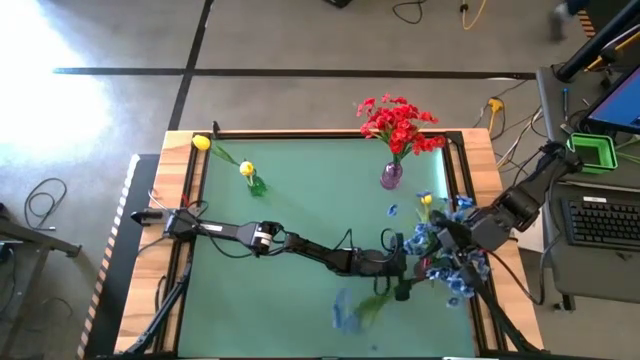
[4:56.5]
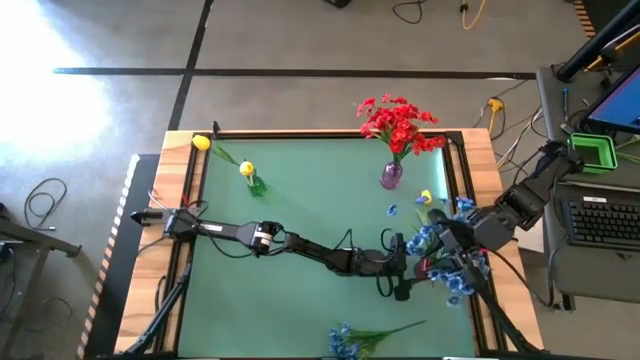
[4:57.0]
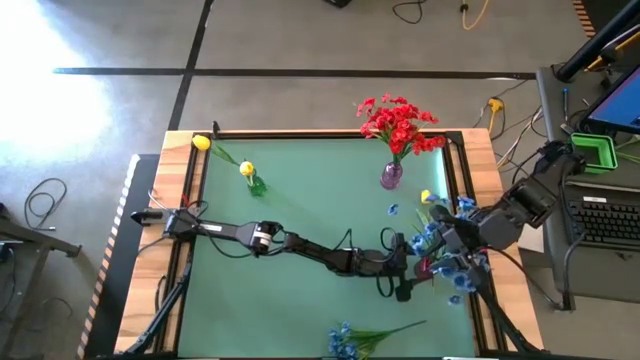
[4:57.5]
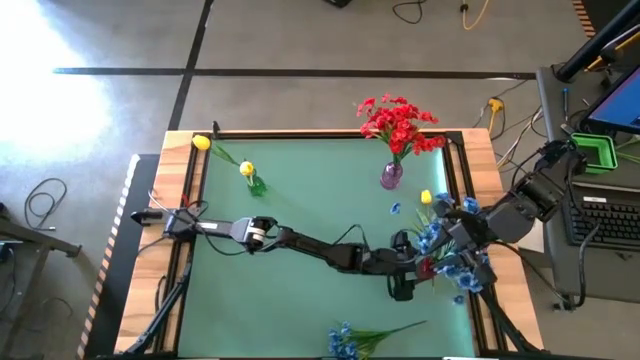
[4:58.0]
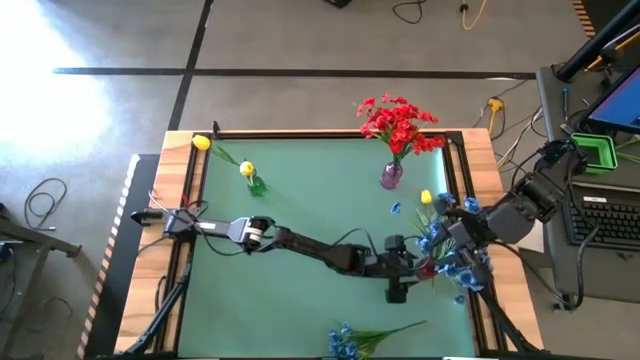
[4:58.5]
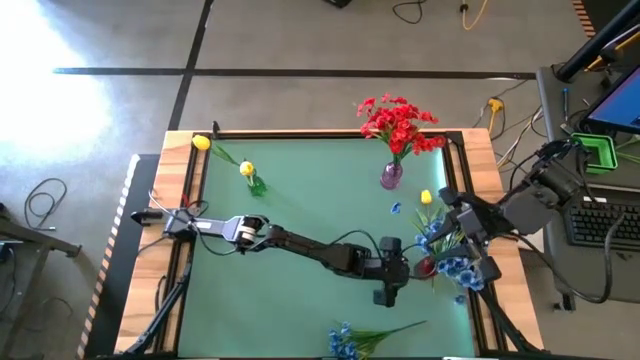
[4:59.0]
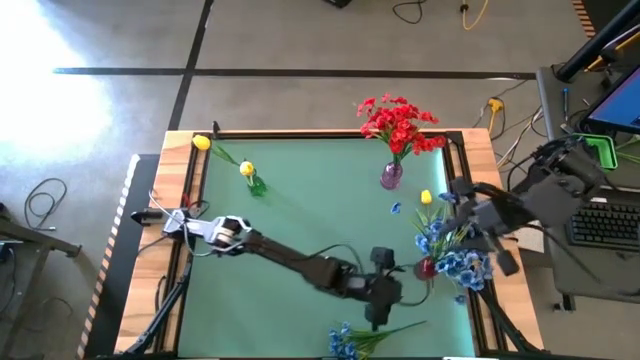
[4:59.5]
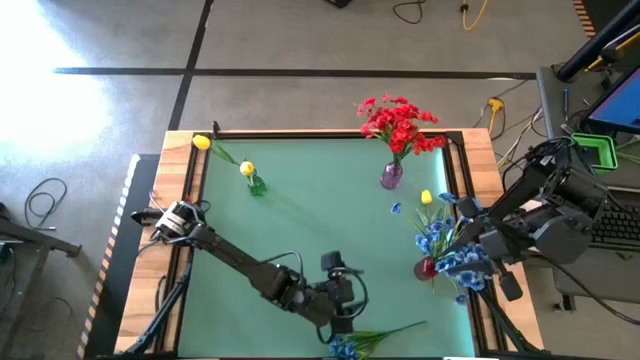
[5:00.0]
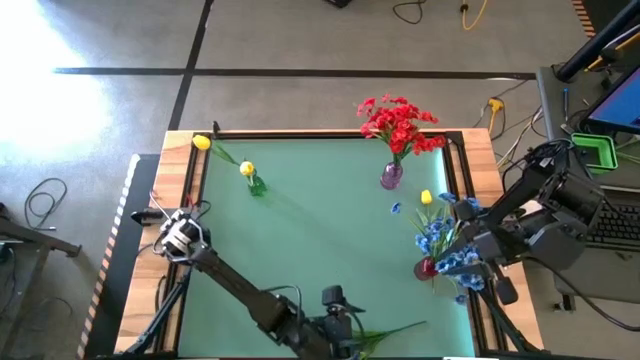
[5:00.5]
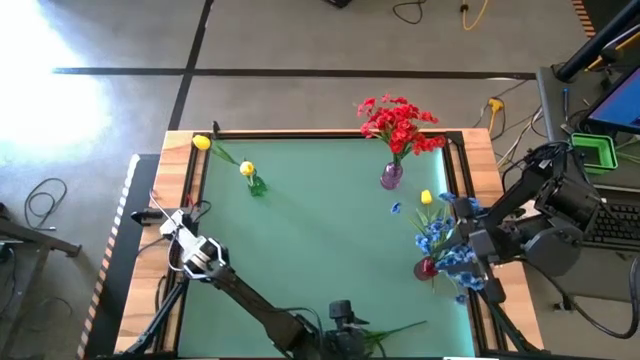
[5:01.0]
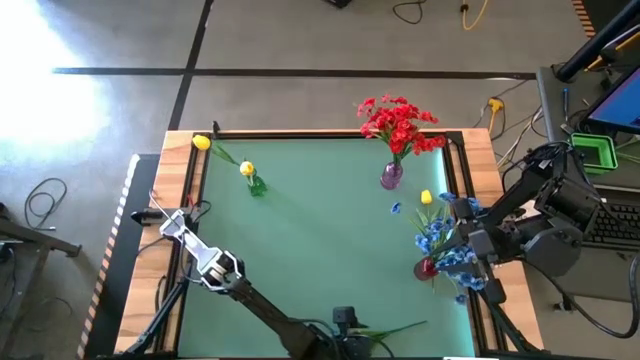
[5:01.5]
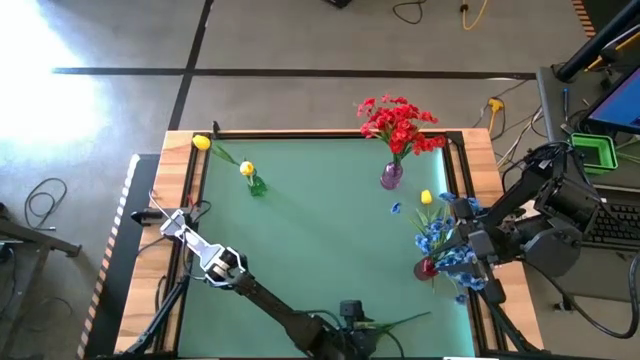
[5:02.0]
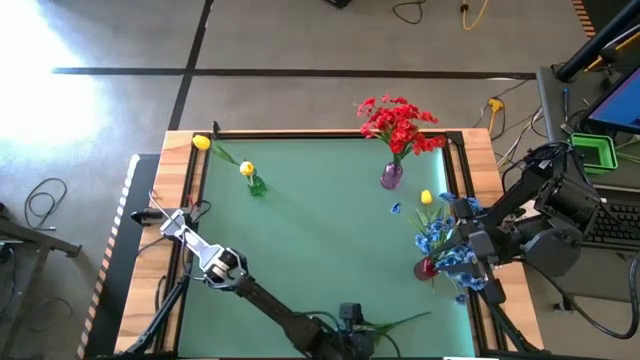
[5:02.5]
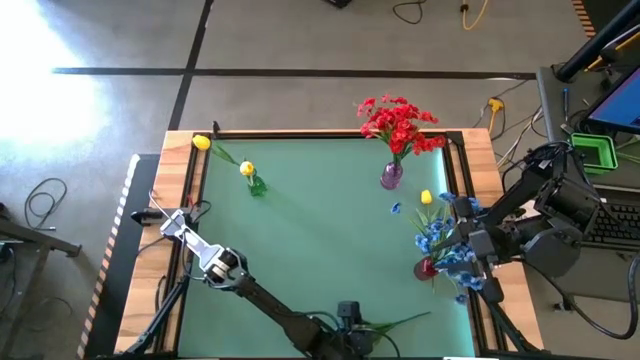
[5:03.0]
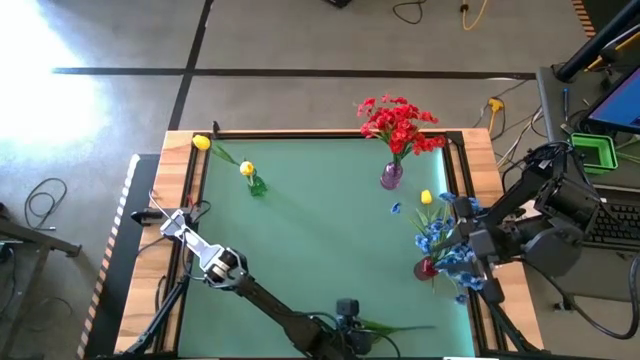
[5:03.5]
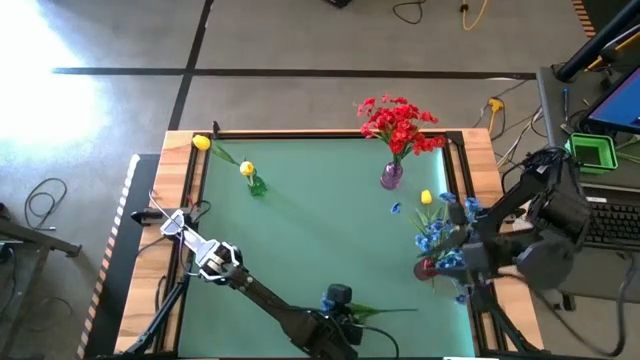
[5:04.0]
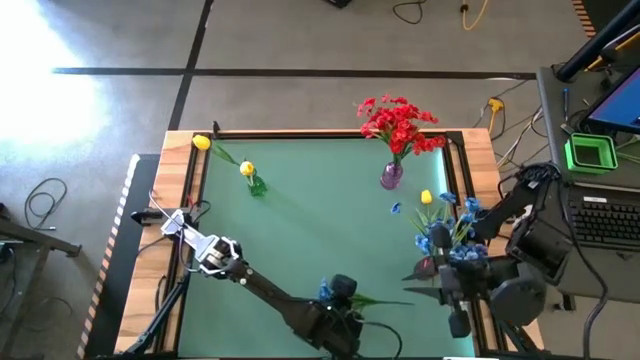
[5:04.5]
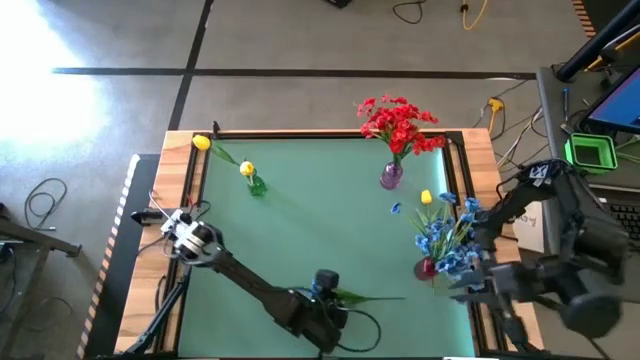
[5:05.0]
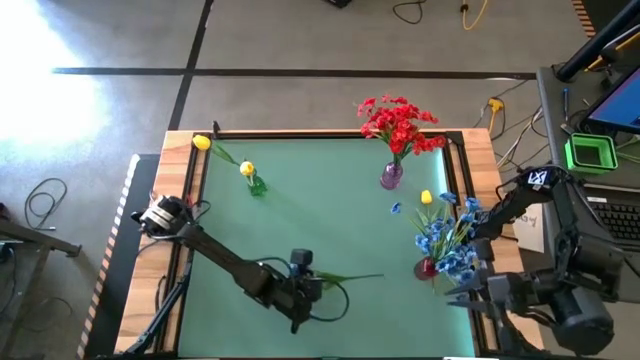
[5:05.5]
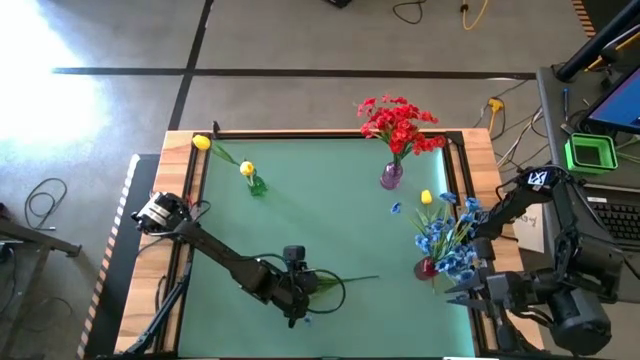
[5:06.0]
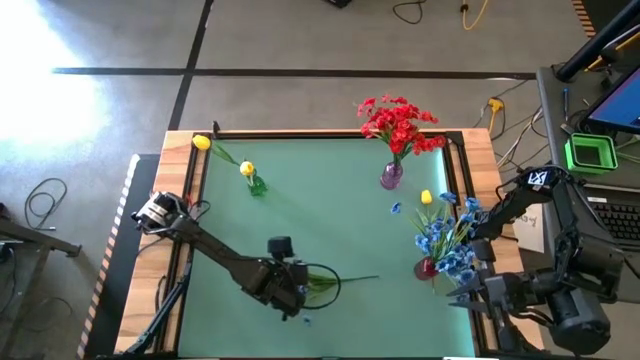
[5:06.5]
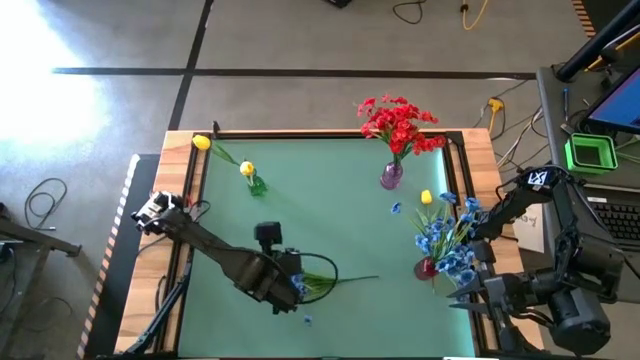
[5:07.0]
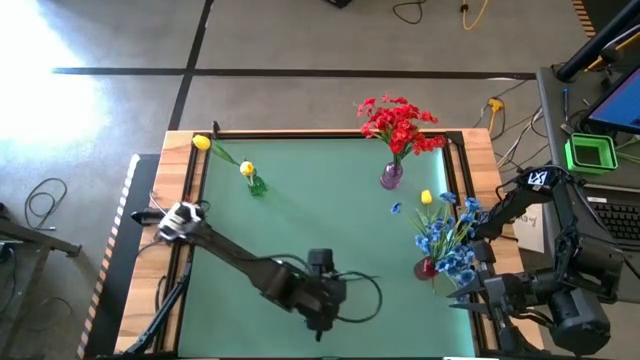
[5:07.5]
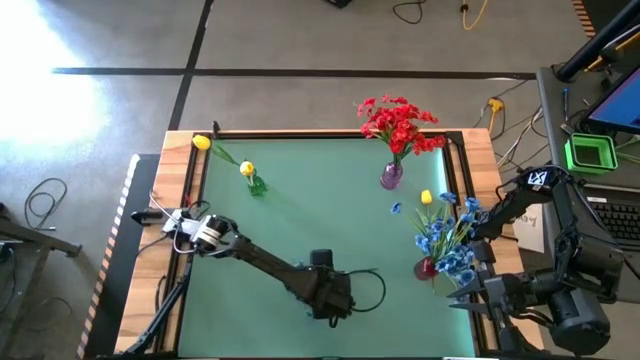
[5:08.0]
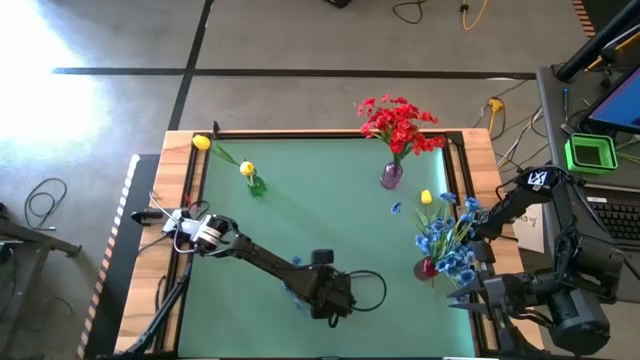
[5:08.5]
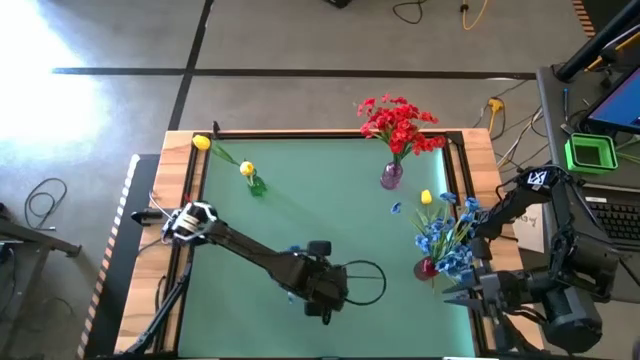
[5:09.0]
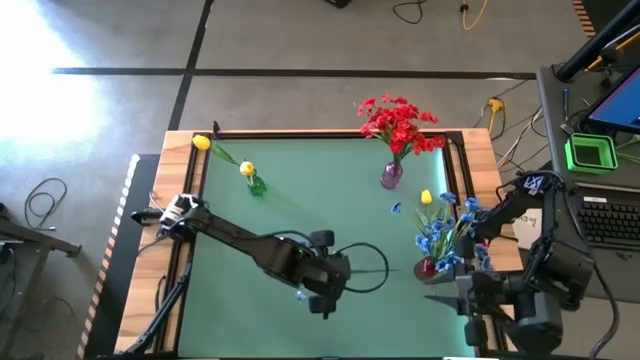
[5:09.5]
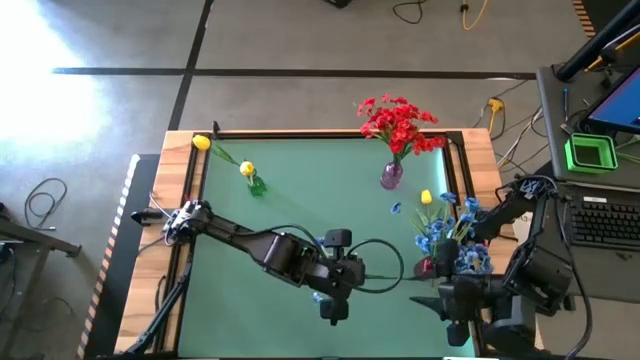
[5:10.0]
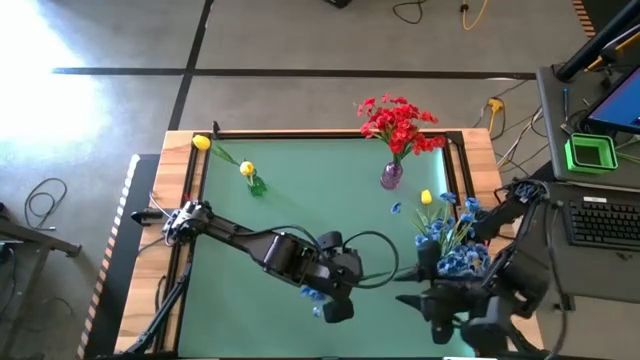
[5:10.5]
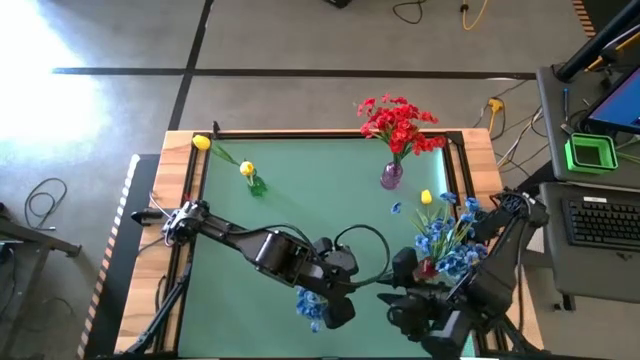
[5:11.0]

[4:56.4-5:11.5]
Task: Sort flowers into vase by color
Put the blue flower into the red vase

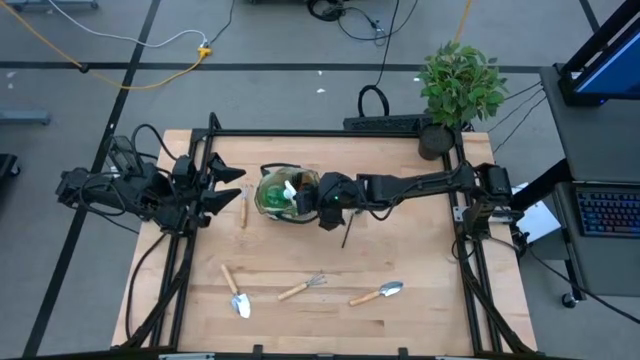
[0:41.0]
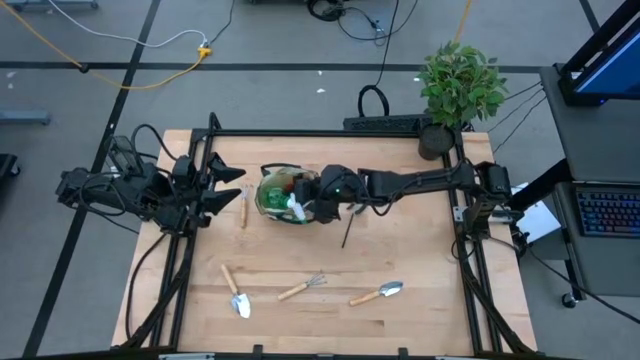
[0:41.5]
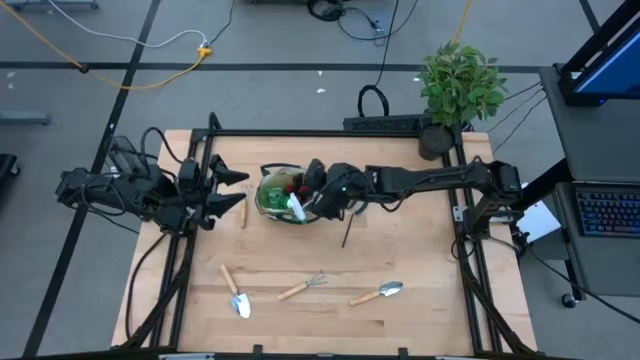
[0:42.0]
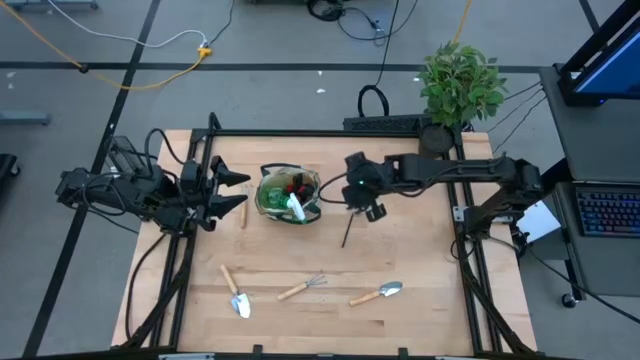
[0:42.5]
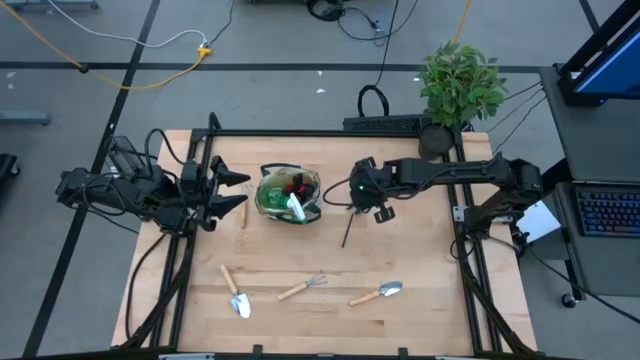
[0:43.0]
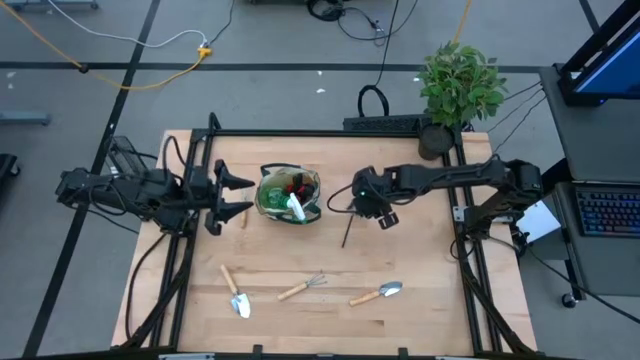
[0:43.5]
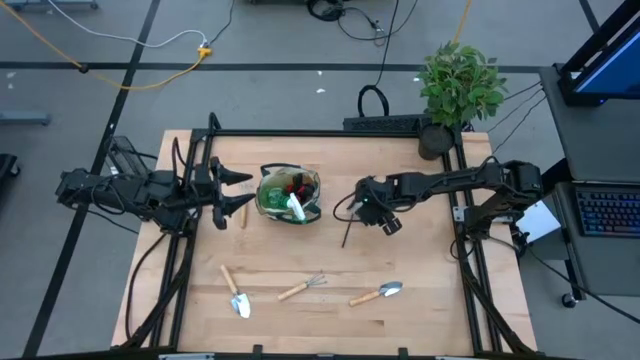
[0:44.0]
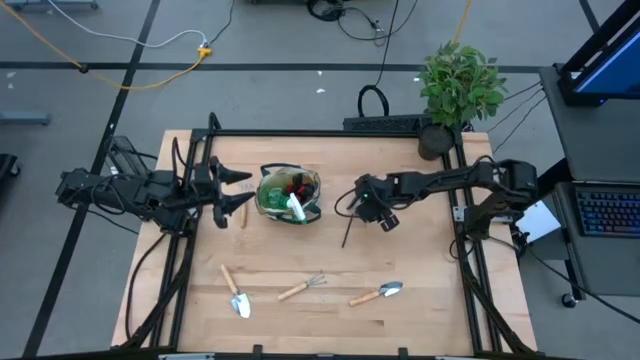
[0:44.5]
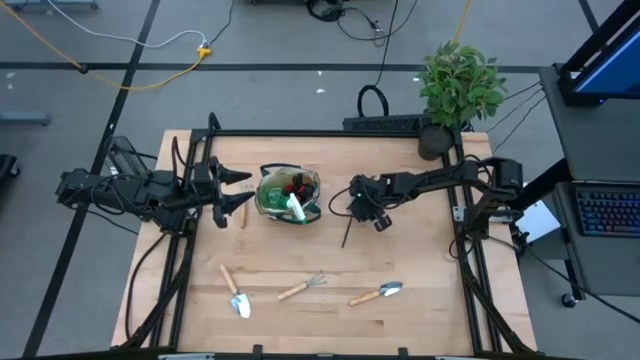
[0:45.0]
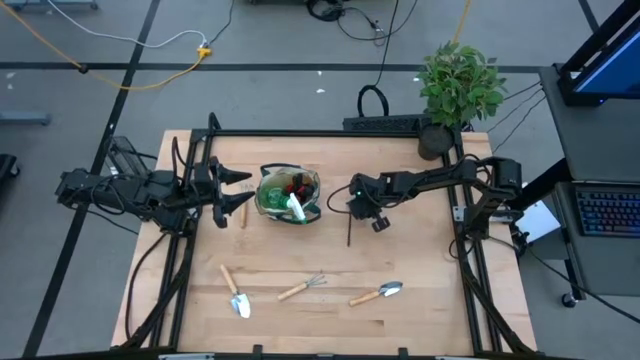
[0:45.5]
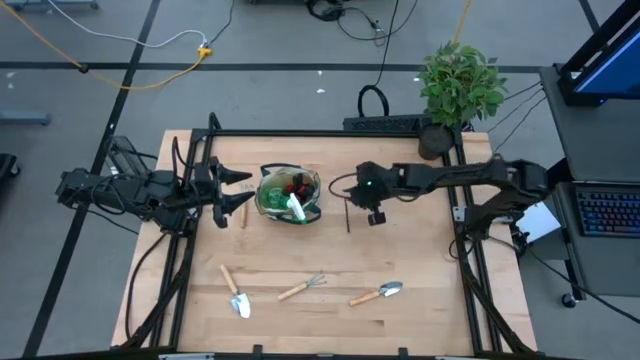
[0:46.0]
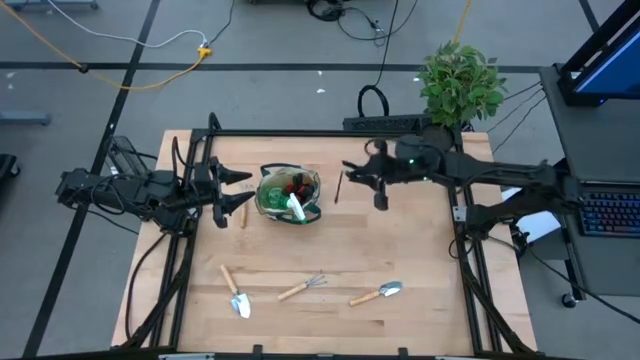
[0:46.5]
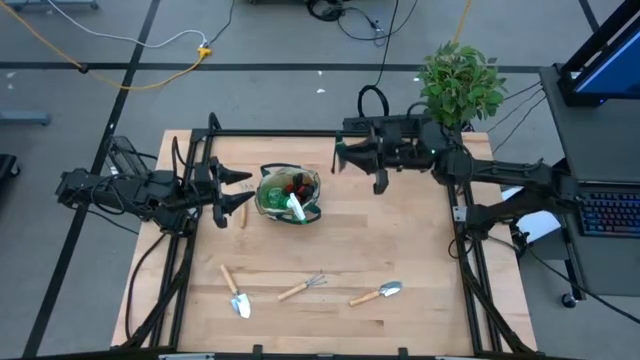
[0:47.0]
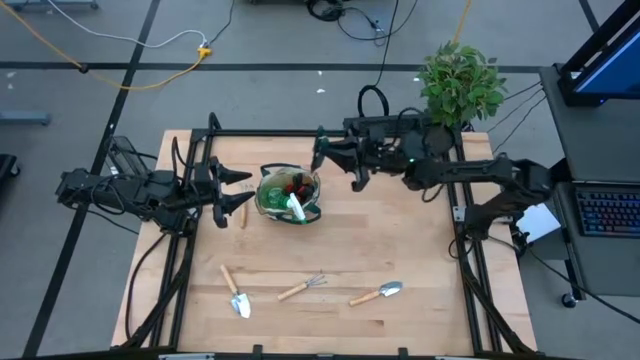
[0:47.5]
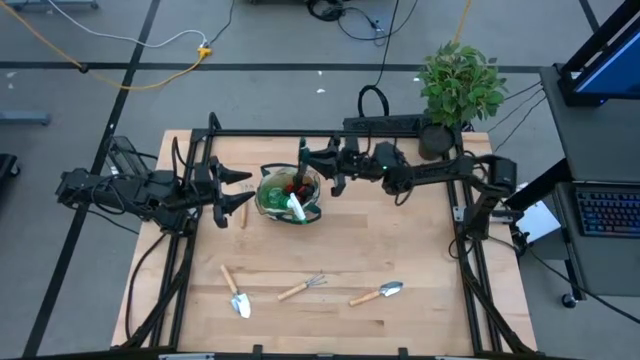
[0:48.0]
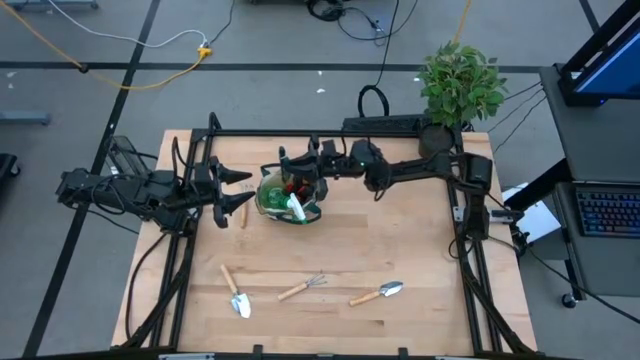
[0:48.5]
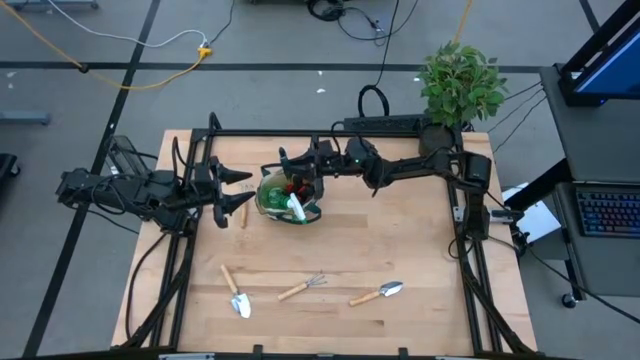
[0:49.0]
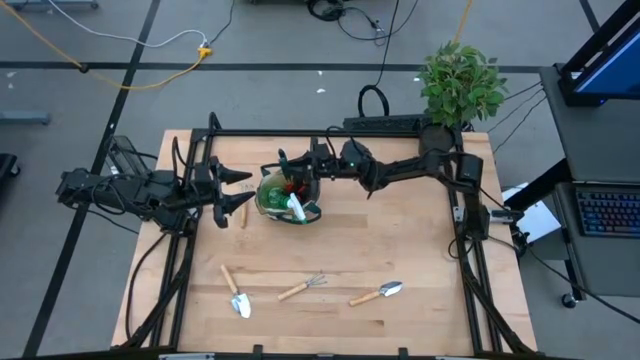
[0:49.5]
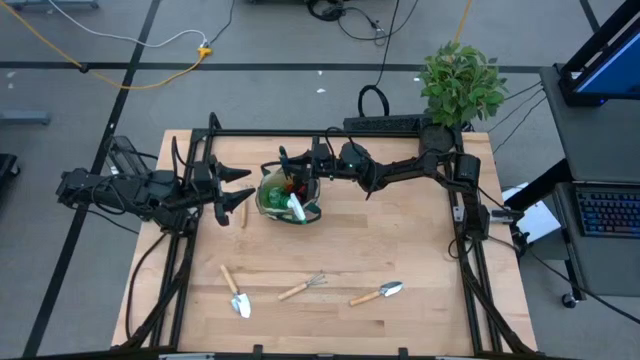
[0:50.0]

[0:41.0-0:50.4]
Task: Pick & Place Garden tools in Gardening bag
Put the green shear scissors into the gardening bag
